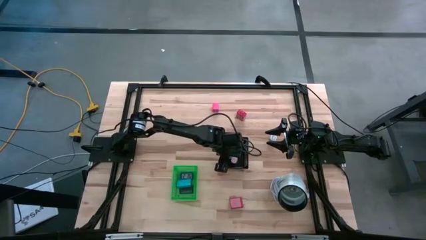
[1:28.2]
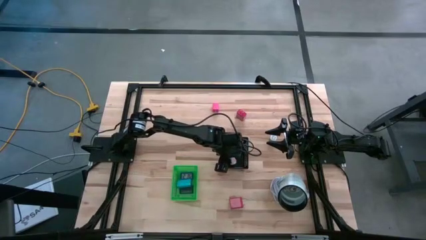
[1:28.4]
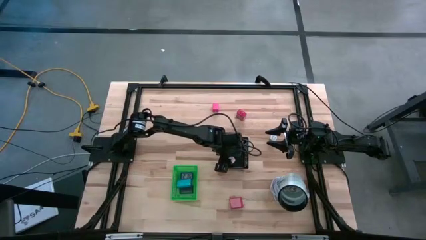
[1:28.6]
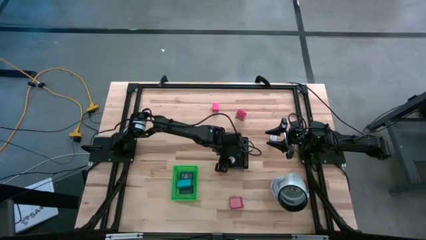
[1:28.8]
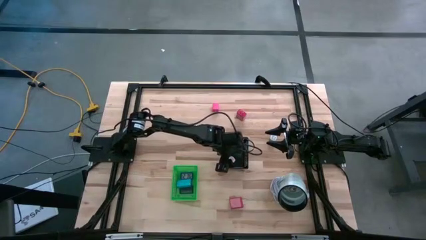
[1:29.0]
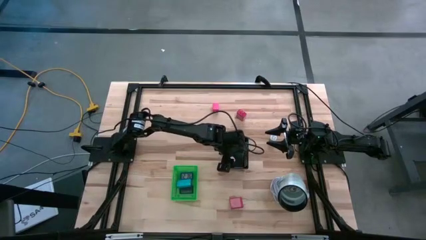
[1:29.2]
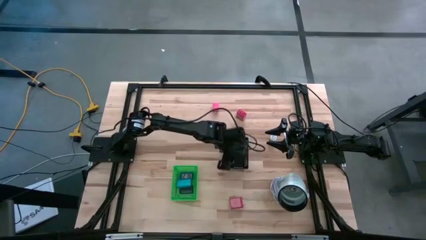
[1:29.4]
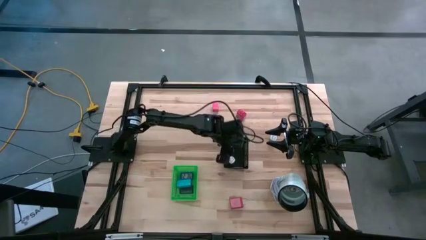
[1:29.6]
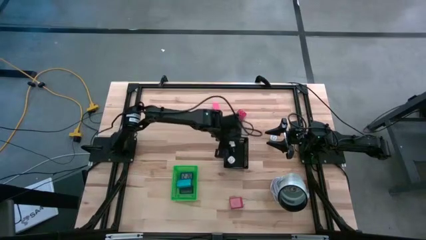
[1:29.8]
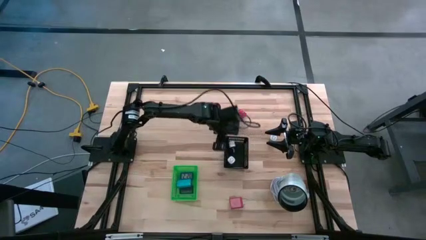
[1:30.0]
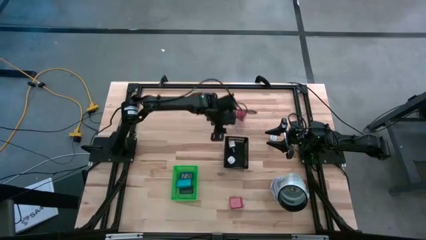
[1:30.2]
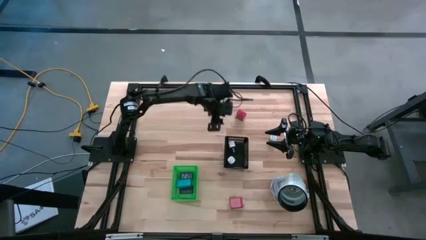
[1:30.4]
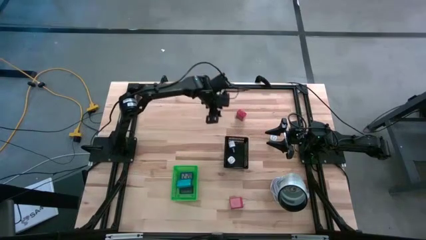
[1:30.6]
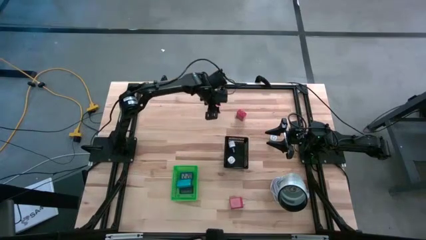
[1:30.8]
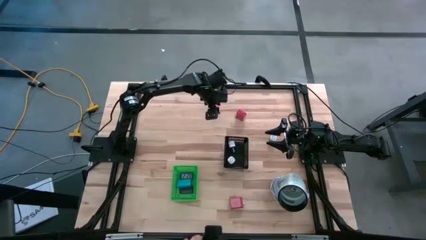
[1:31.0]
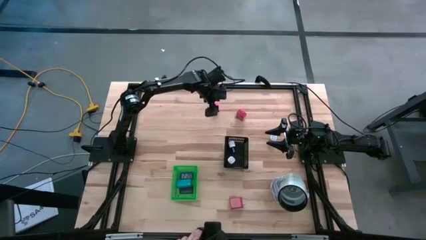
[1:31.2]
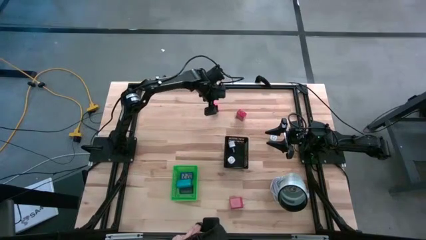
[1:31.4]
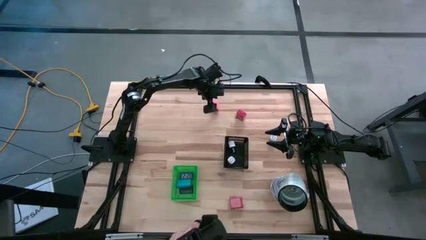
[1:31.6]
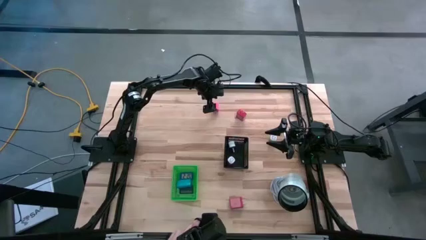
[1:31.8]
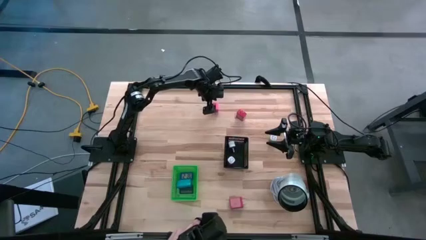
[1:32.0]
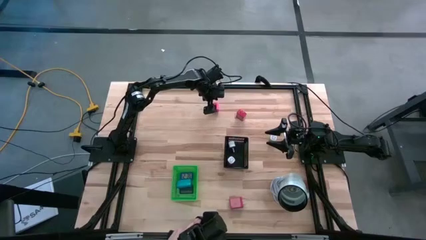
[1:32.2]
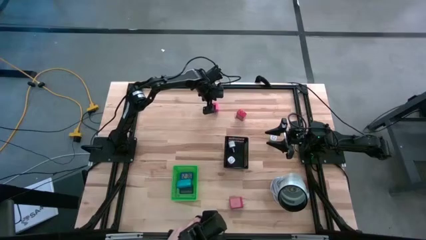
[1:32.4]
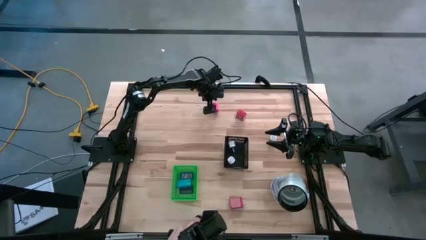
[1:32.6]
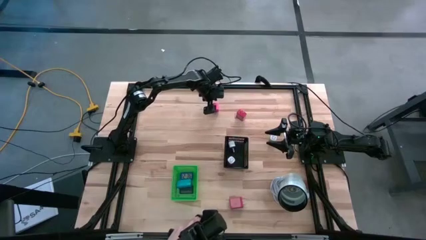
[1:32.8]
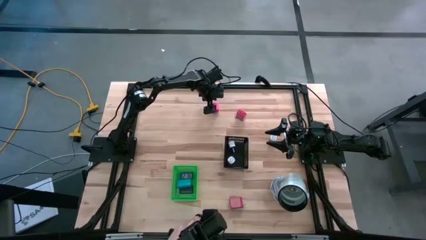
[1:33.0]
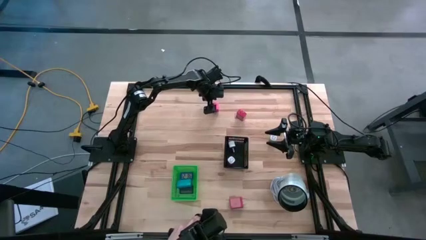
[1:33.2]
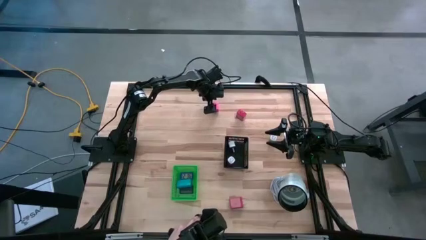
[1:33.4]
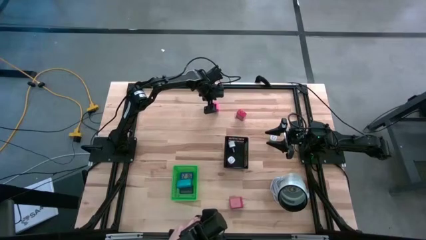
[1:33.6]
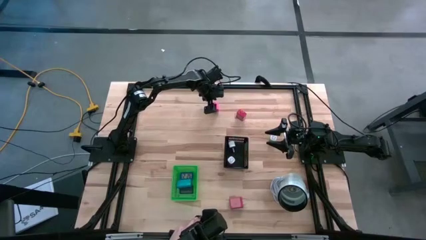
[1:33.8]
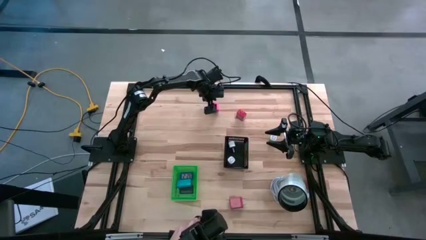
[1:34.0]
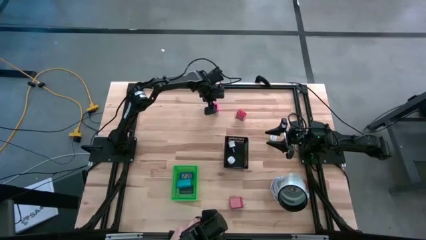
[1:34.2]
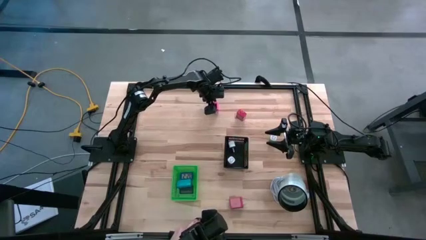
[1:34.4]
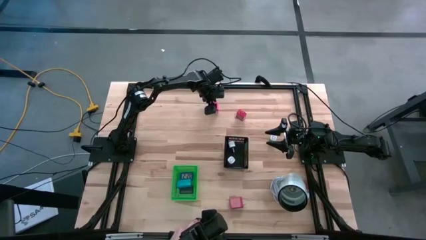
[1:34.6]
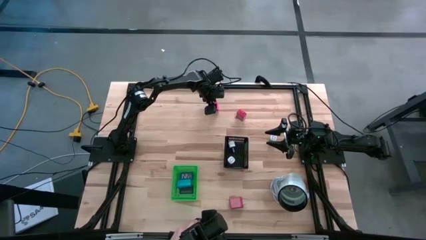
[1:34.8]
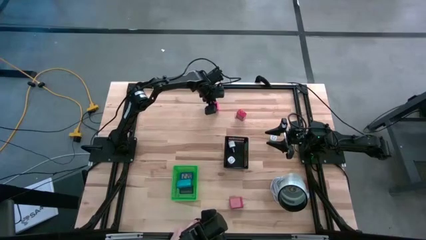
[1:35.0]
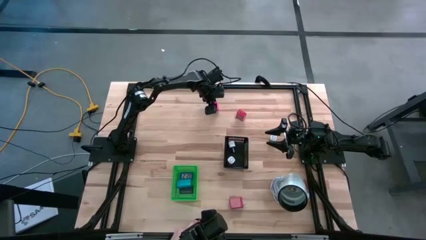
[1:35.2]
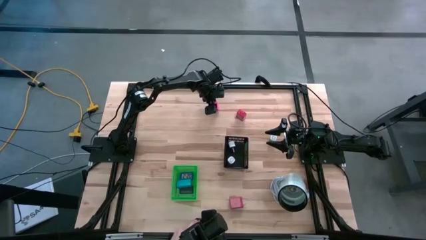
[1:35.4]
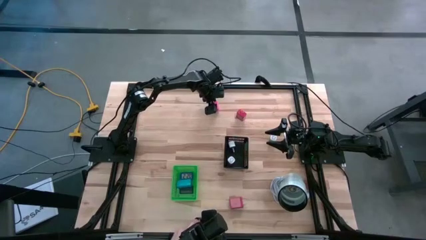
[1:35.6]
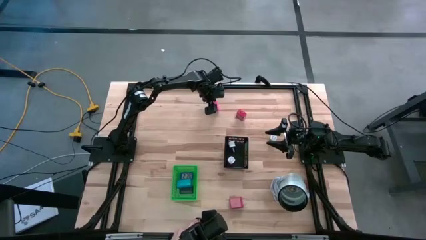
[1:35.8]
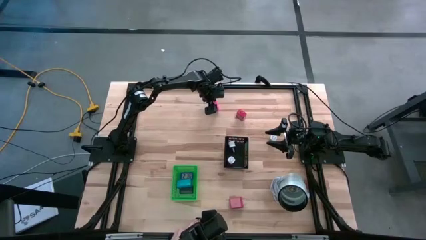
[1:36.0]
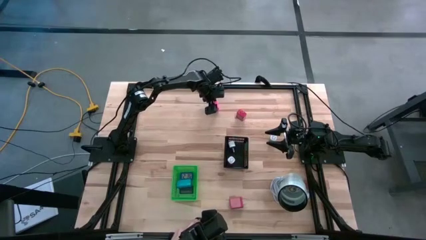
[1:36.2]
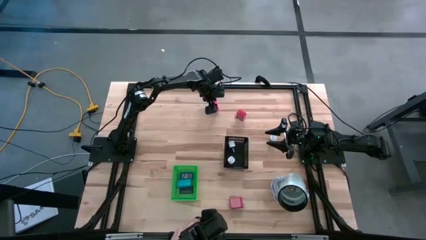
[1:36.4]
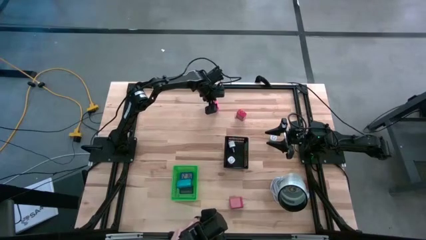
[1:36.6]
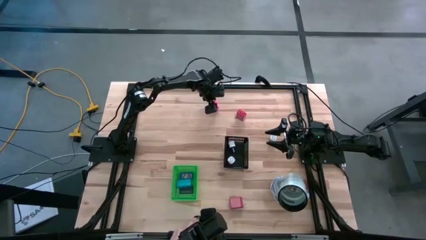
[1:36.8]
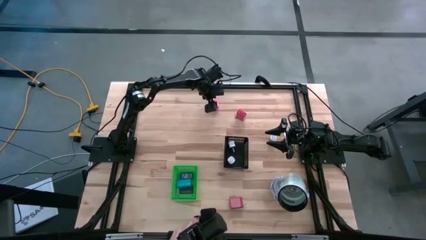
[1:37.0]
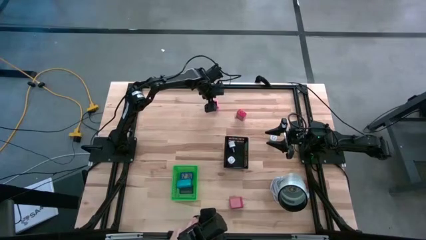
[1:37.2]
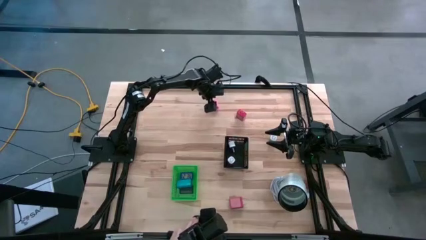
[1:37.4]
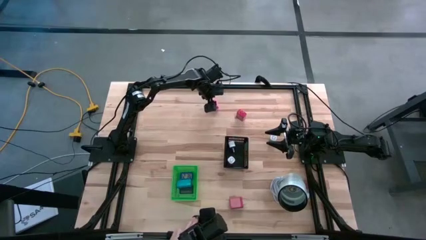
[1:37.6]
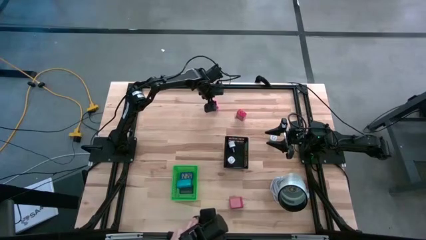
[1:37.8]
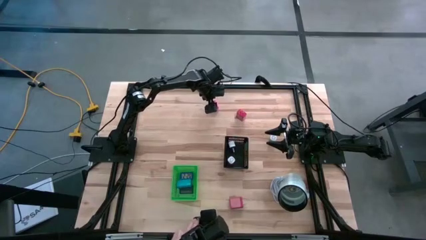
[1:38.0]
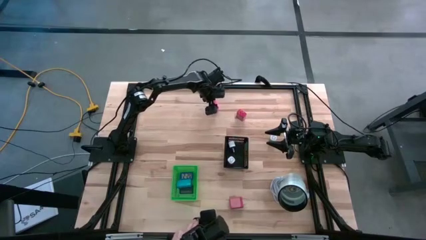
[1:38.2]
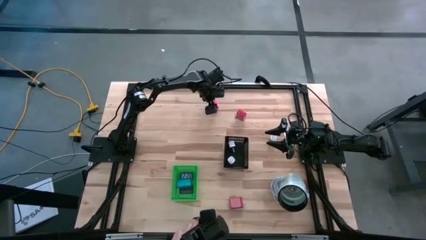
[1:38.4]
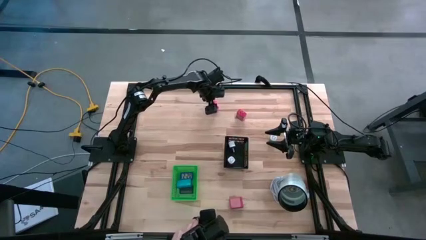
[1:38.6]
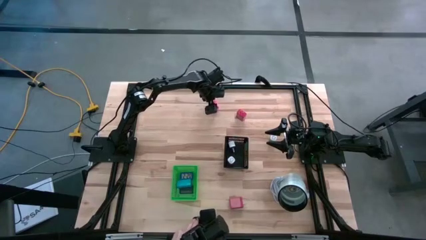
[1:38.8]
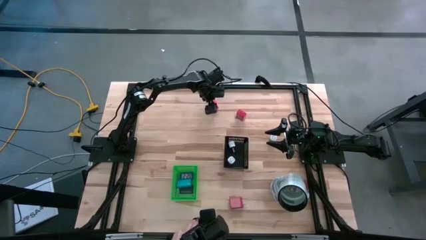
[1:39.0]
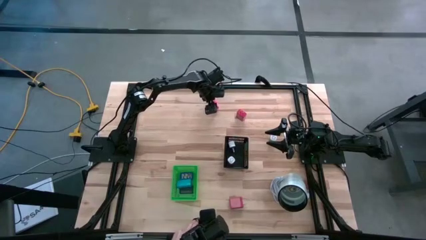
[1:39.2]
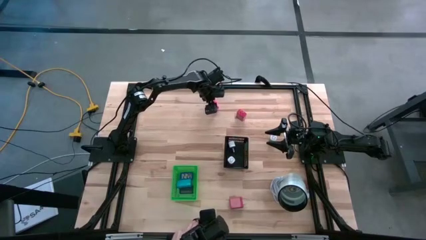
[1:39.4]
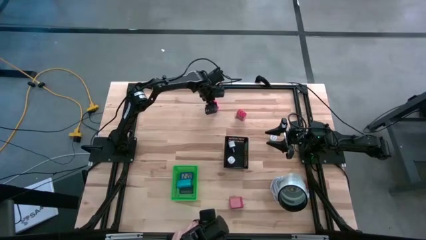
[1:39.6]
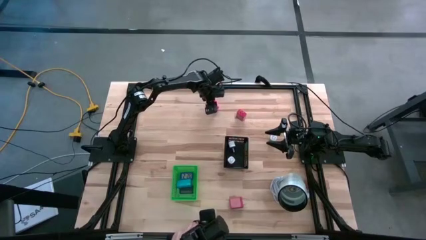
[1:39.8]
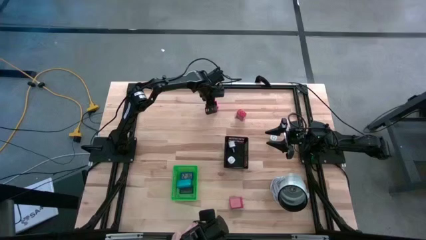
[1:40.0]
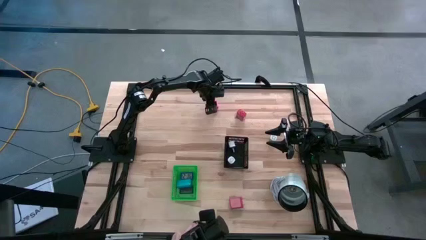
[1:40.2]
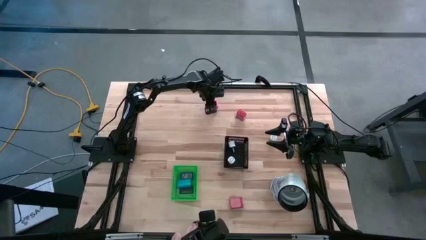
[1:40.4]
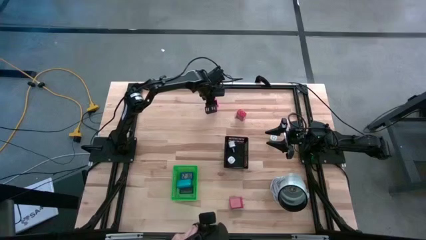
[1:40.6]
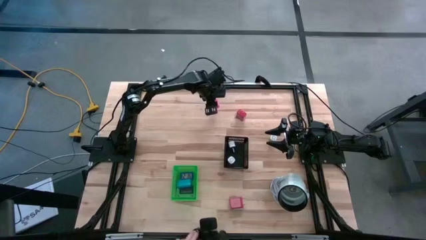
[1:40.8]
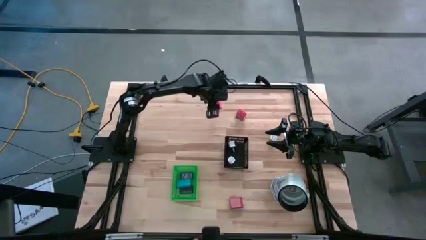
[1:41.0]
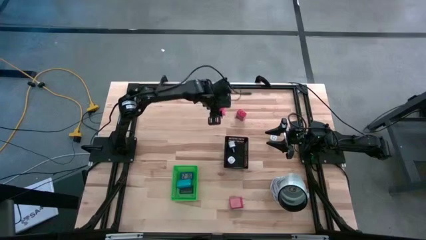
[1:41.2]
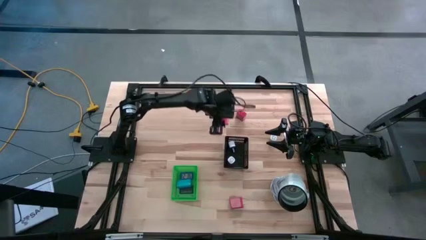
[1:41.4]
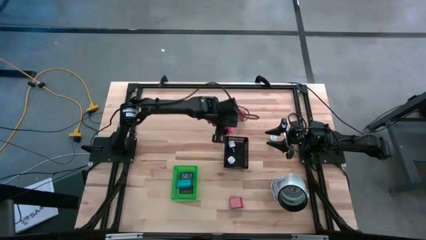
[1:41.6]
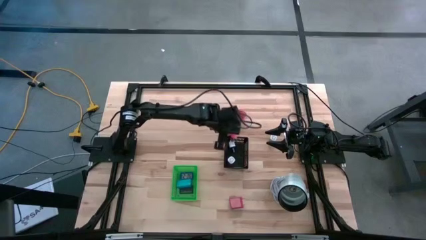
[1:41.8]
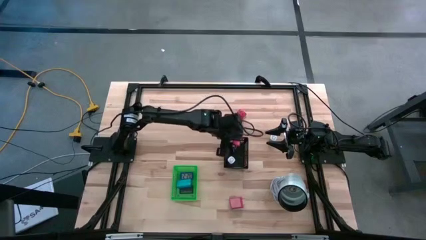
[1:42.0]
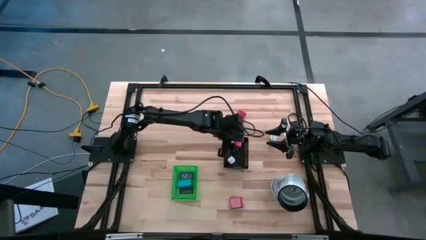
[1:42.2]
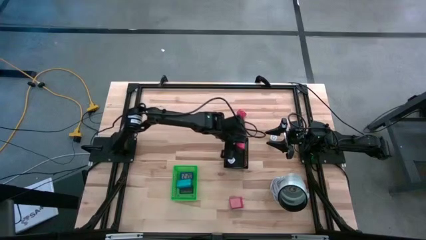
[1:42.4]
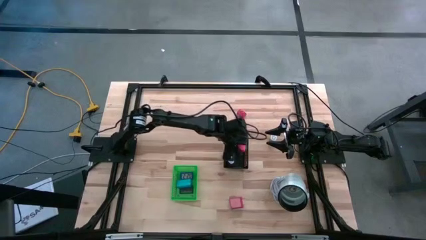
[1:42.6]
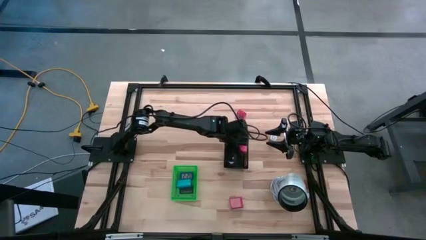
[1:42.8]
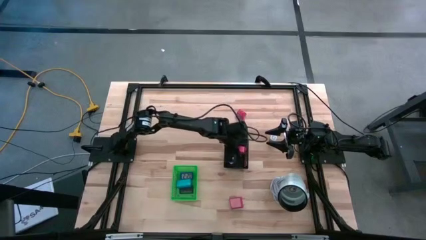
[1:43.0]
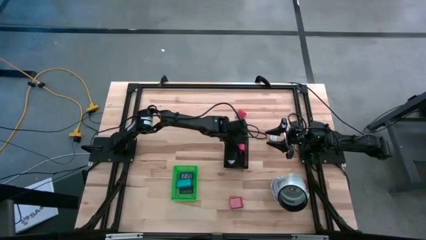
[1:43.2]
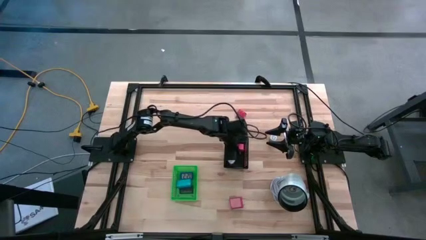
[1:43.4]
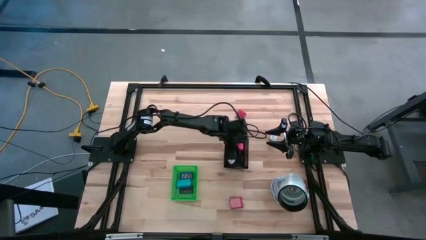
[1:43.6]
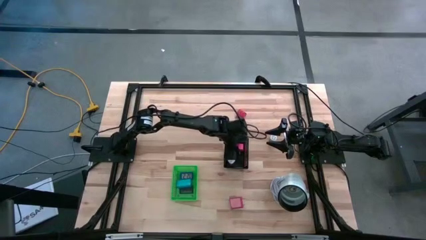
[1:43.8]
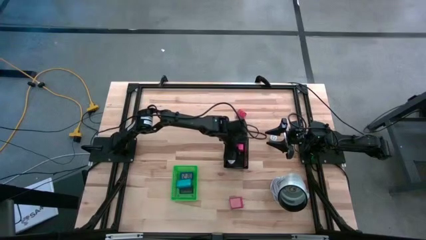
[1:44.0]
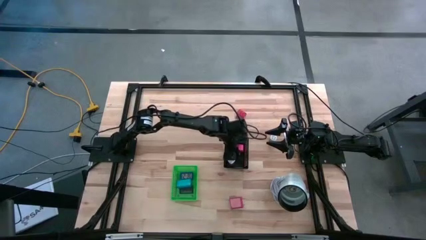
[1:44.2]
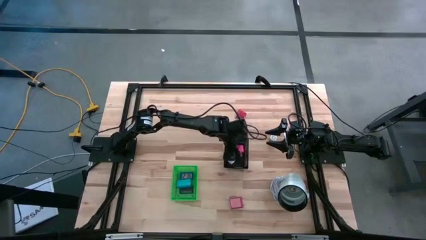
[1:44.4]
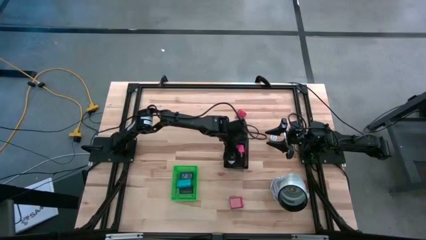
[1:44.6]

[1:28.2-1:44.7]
Task: Pick & Place Office items
Put the orange charger adapter into the black bin
